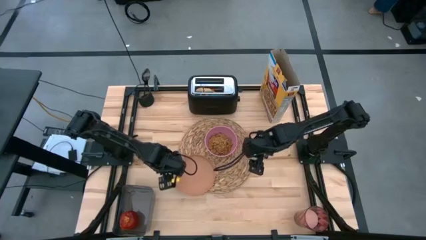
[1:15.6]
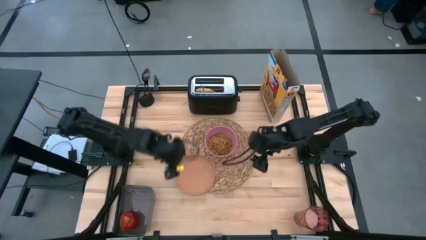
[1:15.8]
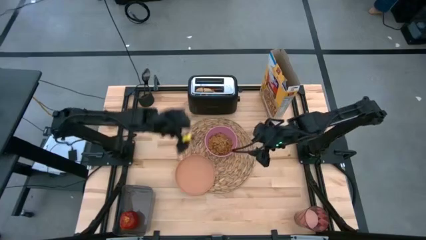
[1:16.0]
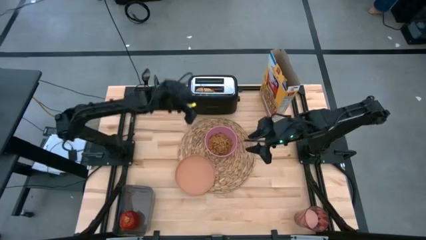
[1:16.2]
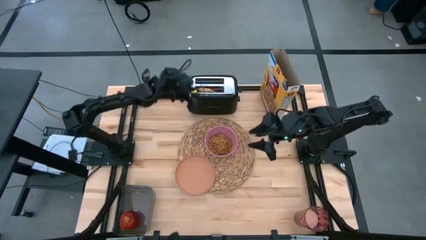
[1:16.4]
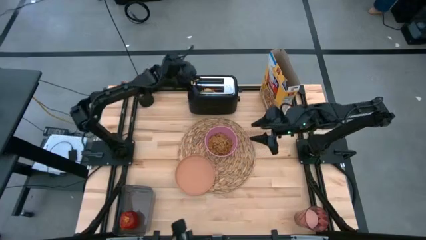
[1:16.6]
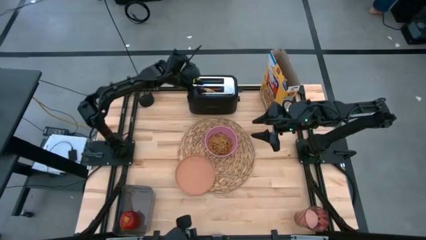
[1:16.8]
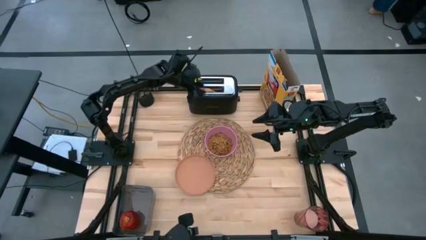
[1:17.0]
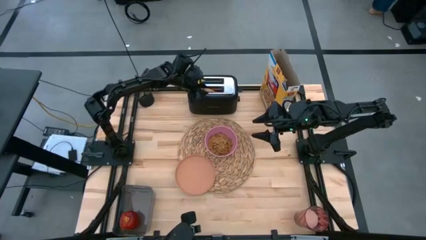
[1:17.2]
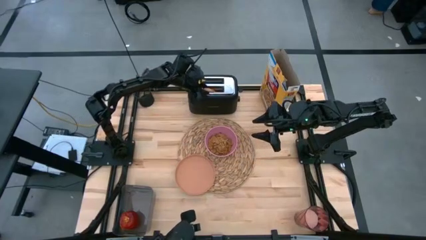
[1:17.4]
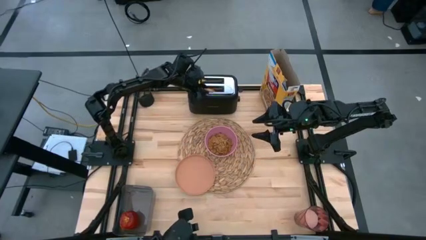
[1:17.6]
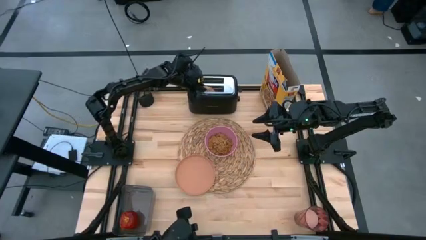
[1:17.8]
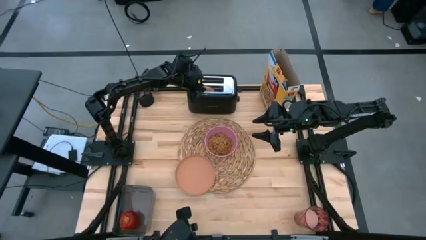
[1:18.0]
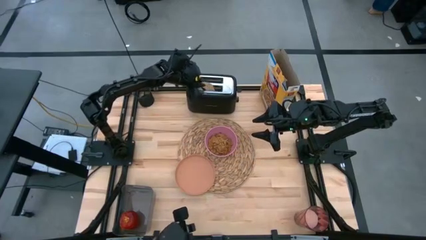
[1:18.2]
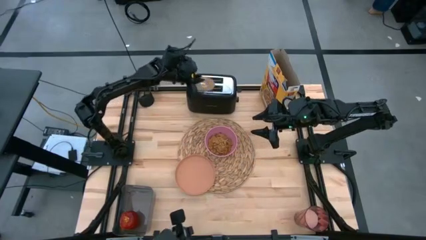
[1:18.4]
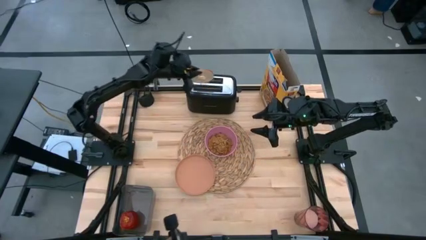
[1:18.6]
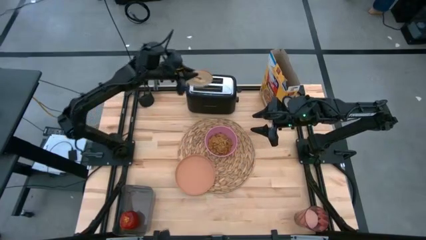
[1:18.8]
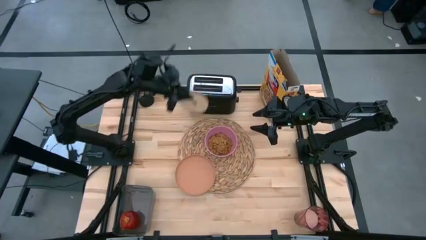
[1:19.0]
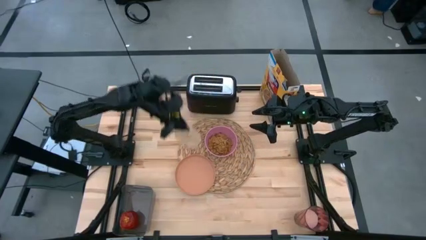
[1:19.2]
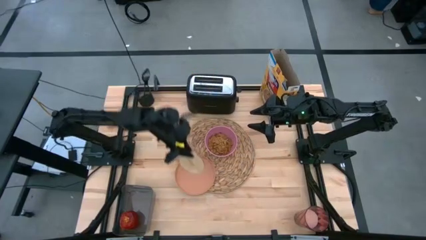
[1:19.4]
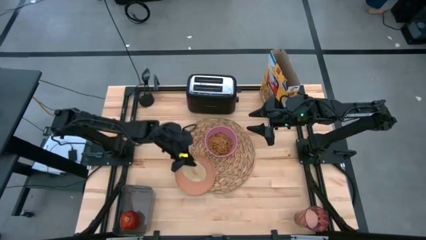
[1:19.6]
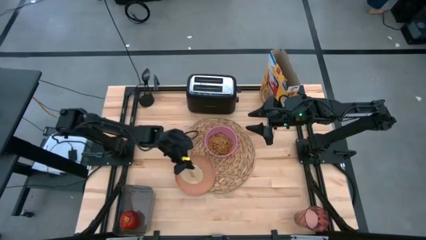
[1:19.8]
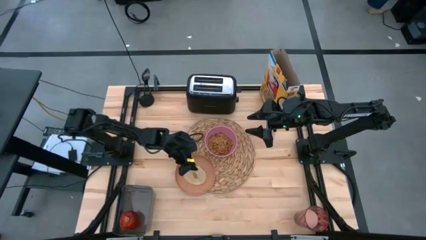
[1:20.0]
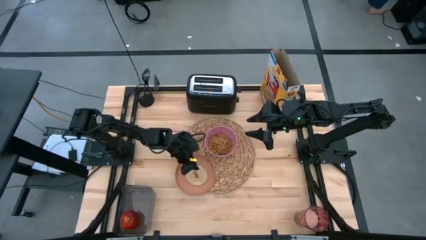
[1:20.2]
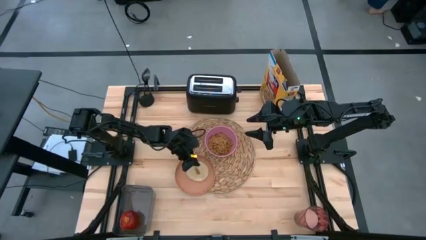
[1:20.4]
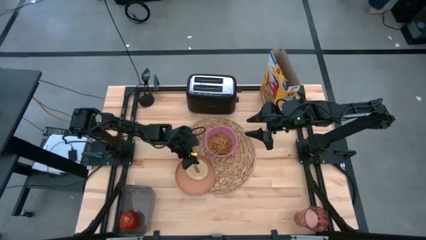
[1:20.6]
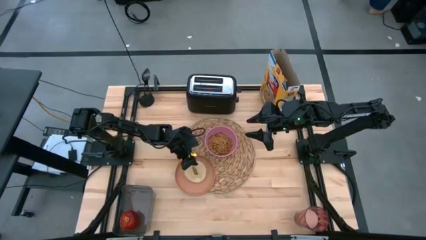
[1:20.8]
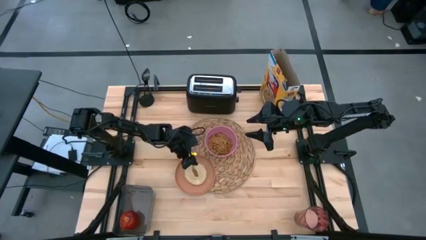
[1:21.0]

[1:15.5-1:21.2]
Task: Arrange a breakfast setting
Put the toasted bread on the brown plate

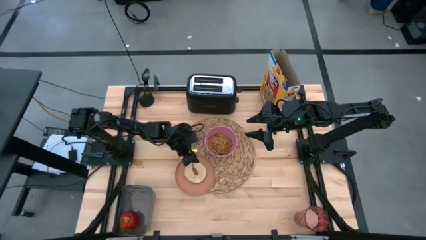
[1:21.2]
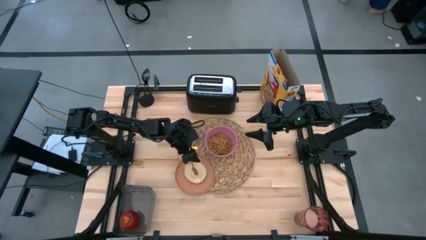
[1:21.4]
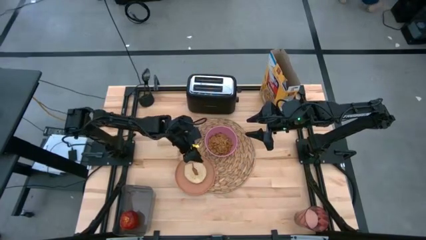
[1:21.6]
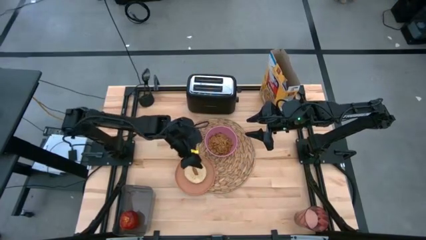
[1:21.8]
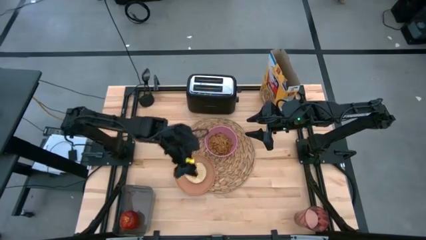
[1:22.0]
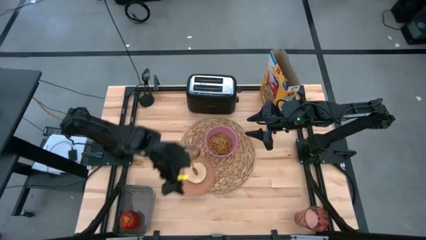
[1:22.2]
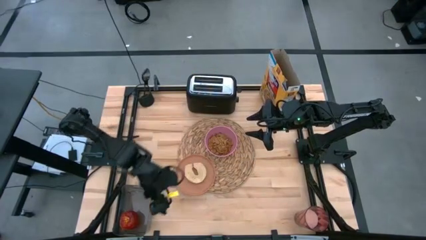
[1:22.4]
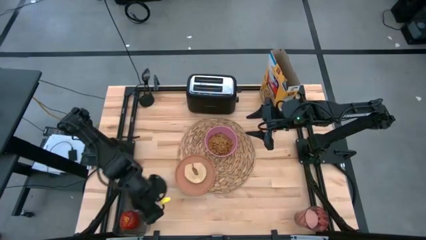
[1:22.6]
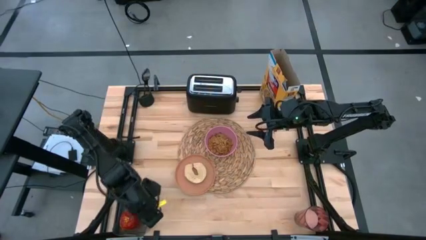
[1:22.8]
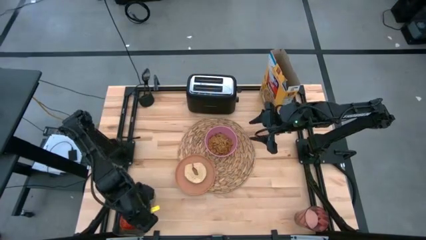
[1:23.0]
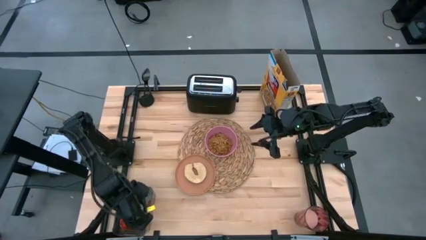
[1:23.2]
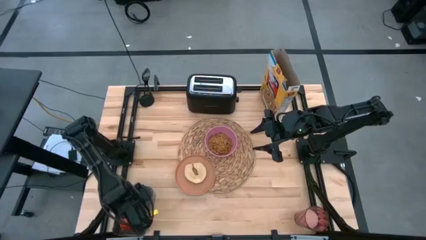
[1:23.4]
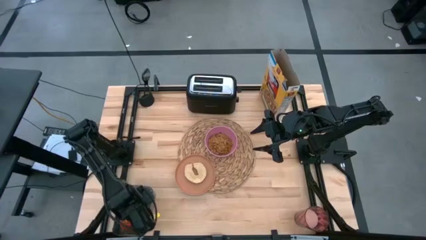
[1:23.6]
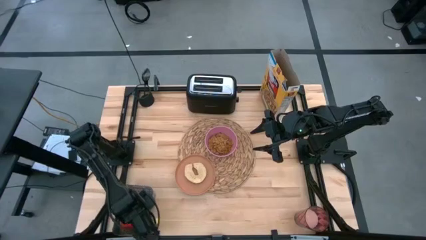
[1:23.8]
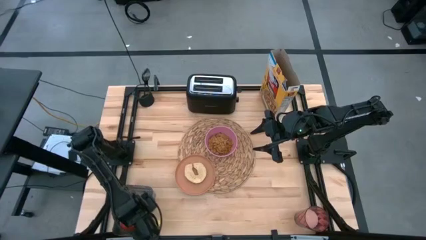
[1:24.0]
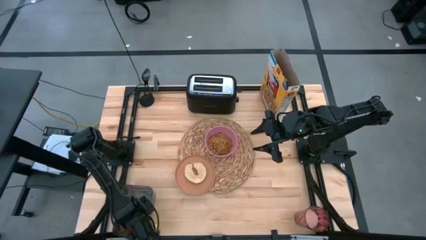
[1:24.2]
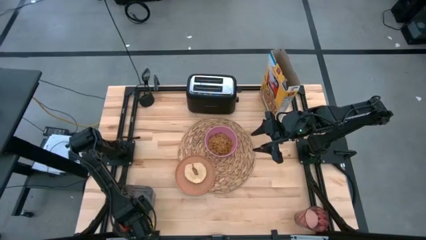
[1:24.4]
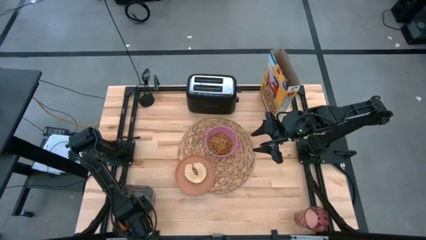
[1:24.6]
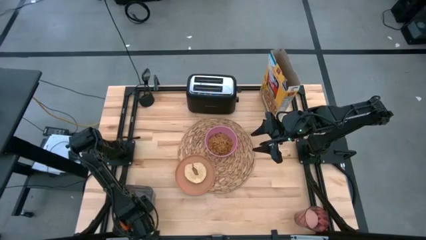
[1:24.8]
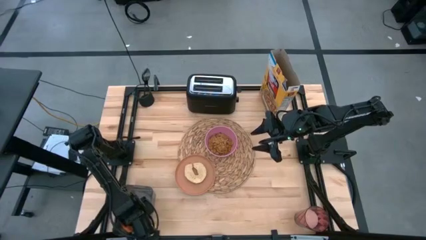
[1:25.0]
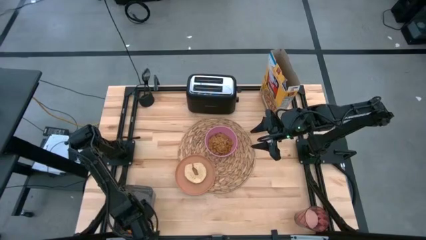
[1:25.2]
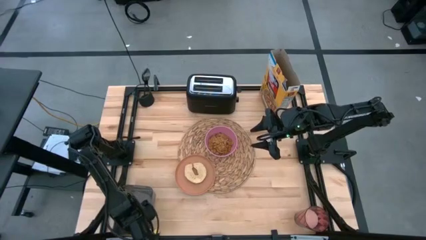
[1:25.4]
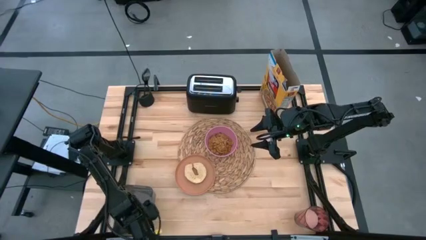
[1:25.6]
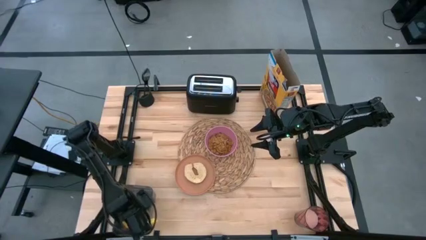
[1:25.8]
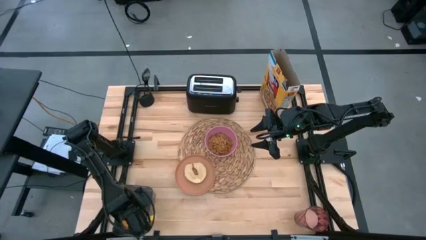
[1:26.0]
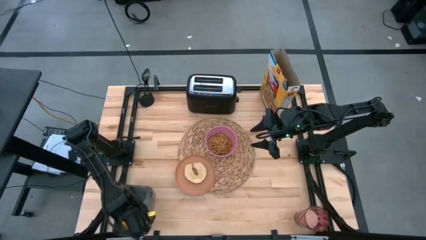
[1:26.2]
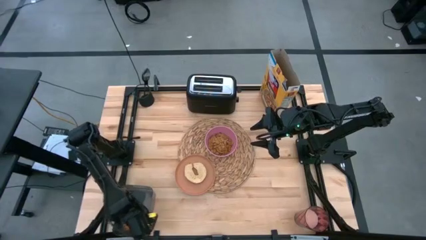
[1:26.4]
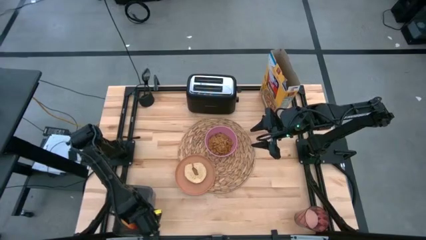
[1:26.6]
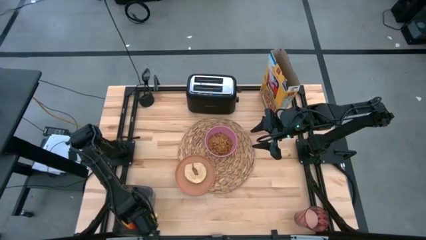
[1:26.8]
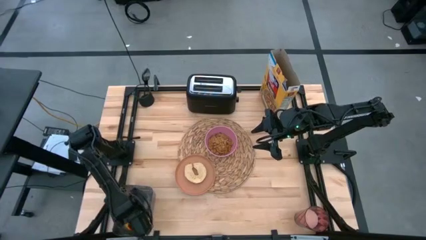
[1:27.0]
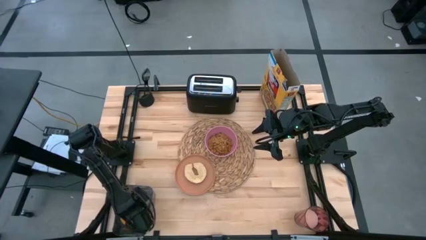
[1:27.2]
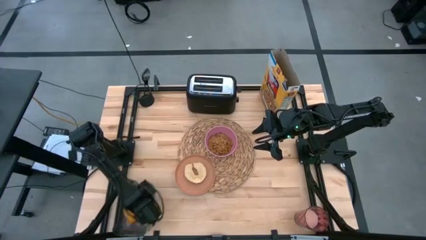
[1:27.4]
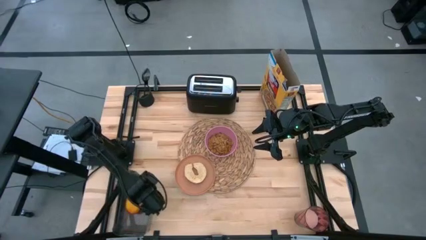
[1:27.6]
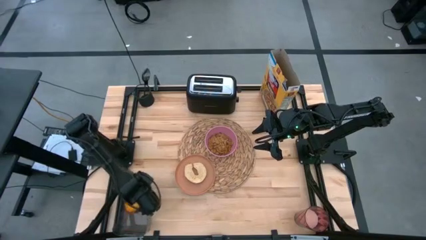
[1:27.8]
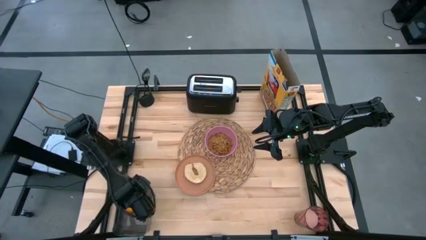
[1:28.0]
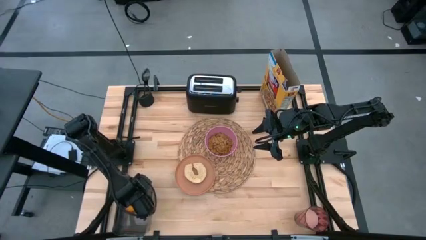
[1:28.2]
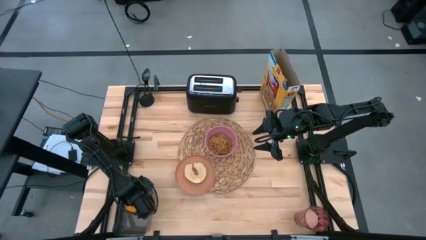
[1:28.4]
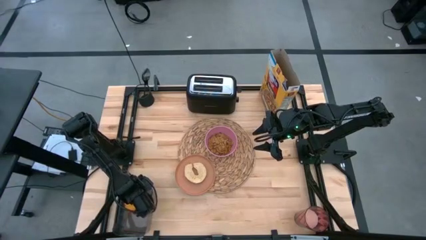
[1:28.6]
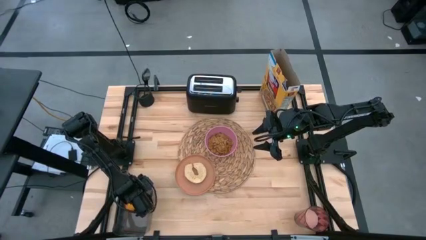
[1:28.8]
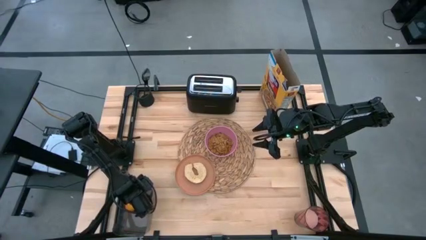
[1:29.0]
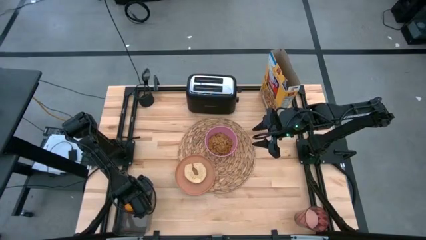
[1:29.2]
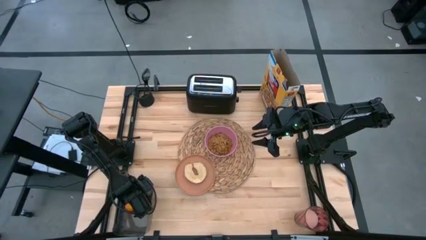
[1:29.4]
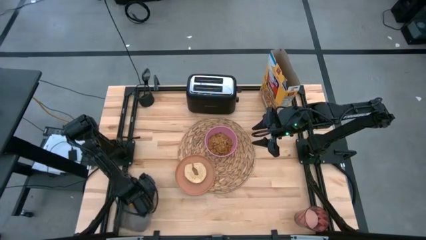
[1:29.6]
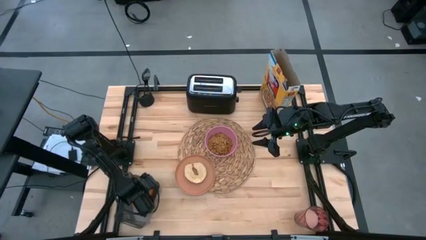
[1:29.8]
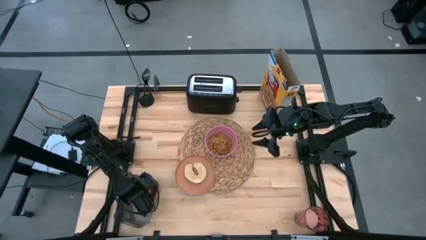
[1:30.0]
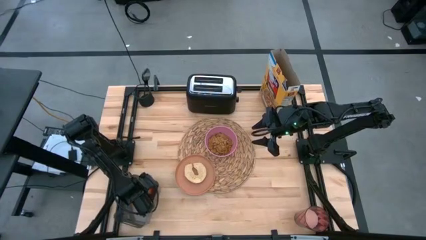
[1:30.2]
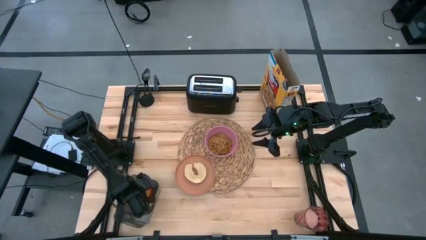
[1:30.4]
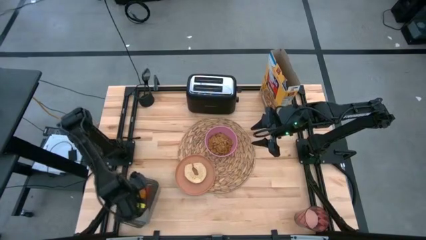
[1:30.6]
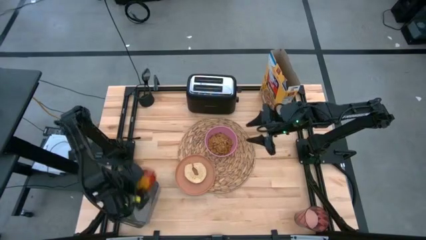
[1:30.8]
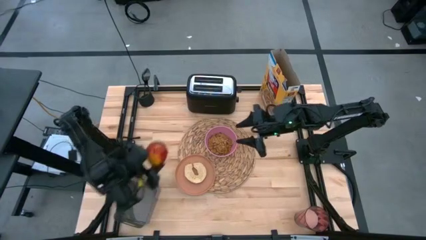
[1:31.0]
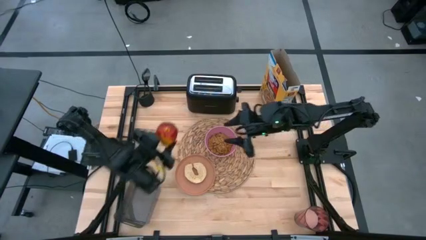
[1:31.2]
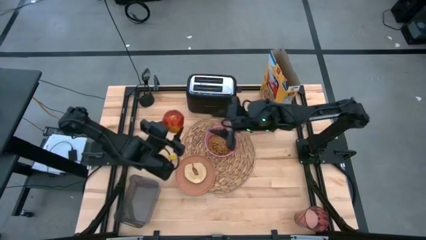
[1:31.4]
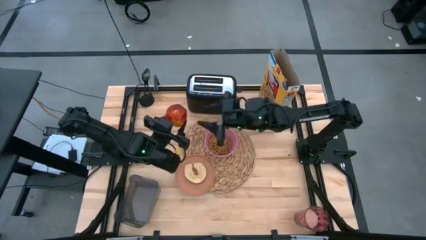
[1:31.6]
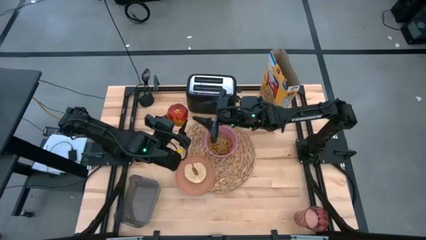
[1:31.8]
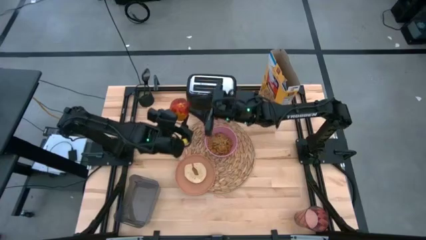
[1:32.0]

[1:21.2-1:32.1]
Put the apple on the brown placemat
